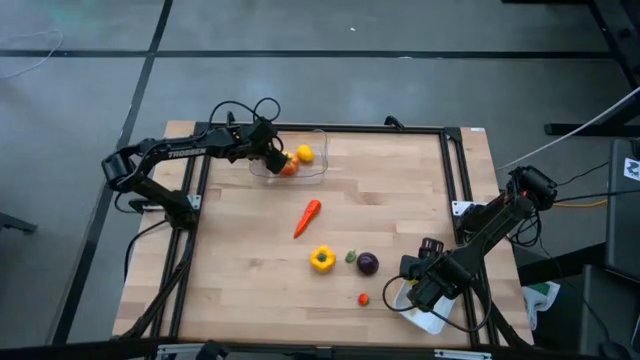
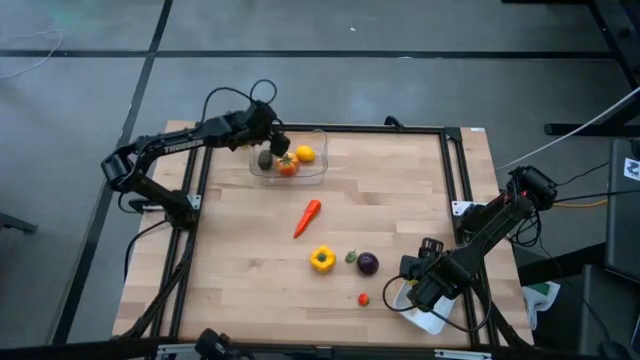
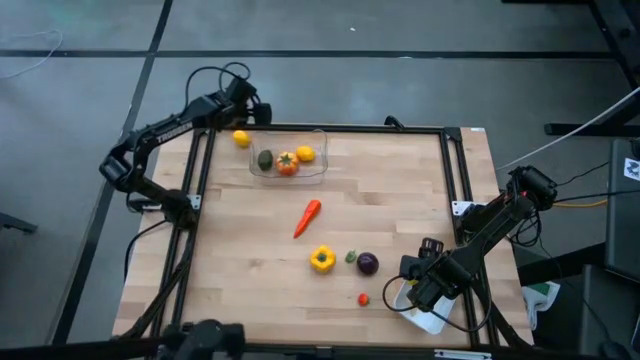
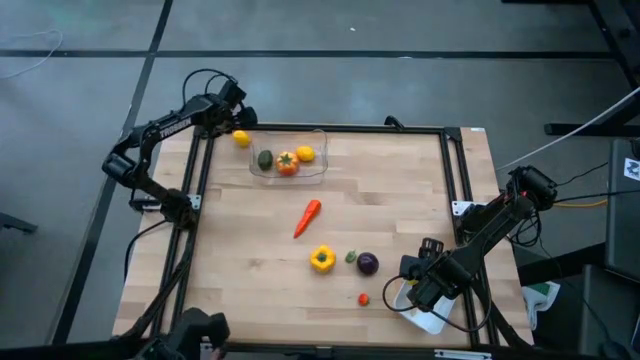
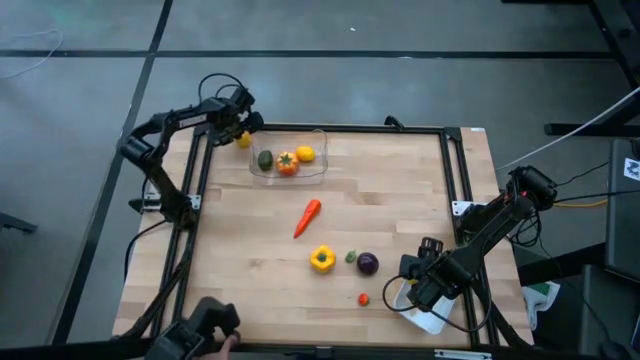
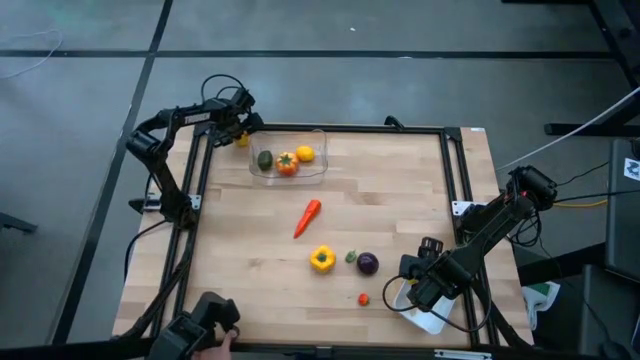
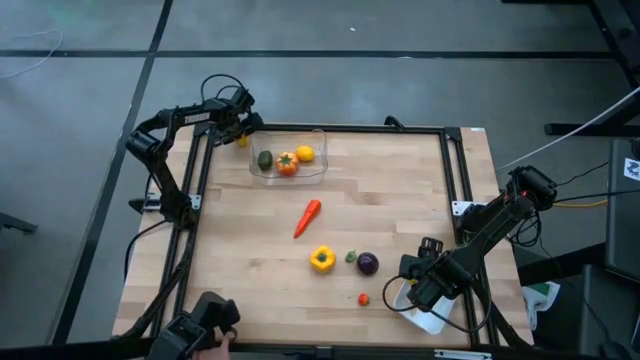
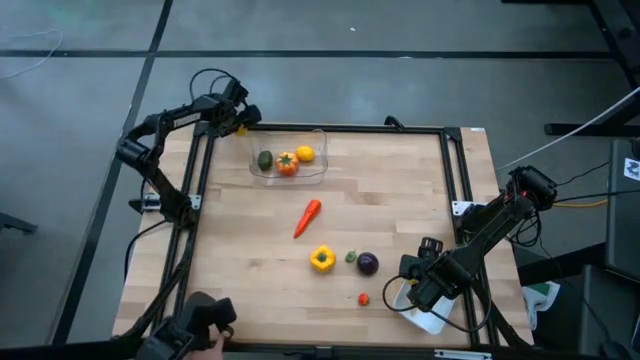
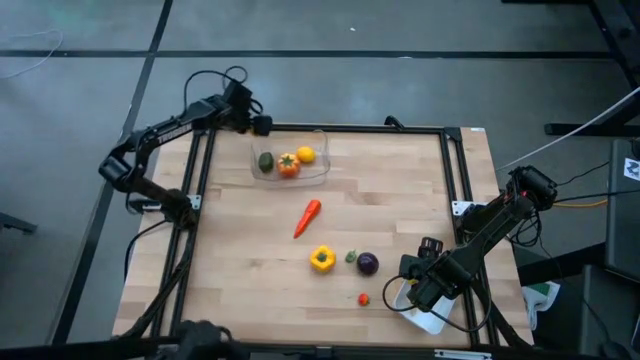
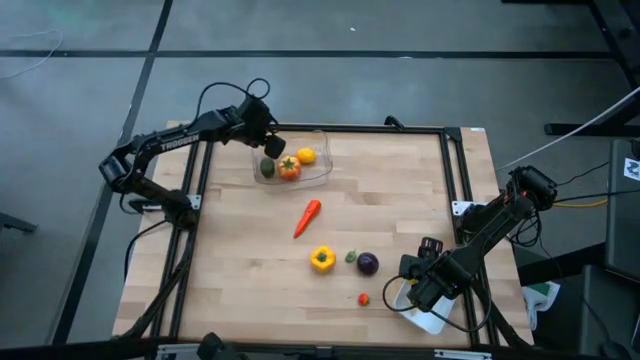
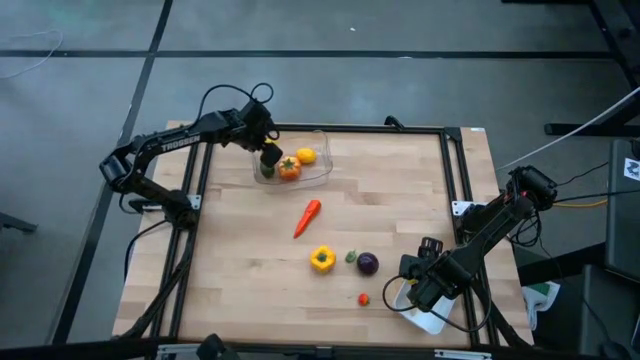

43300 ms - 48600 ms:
Task: Sort produce into baskets
Put the yellow lemon into the transparent bin

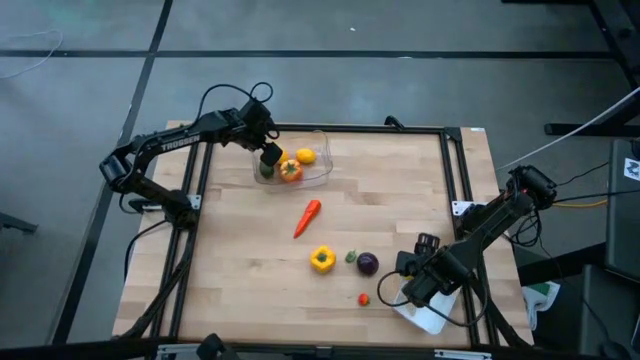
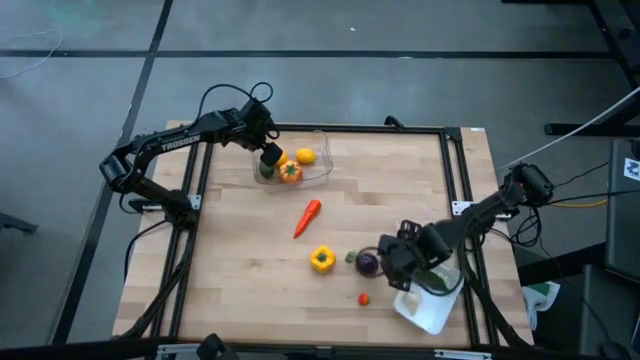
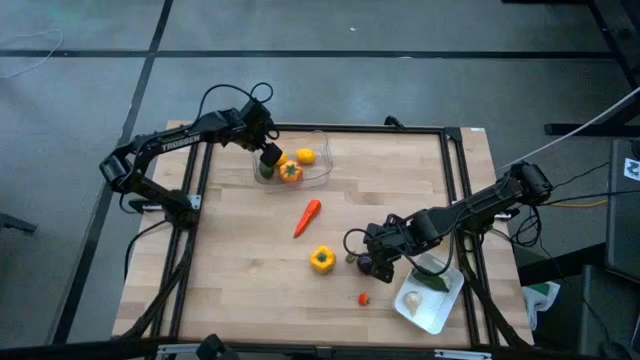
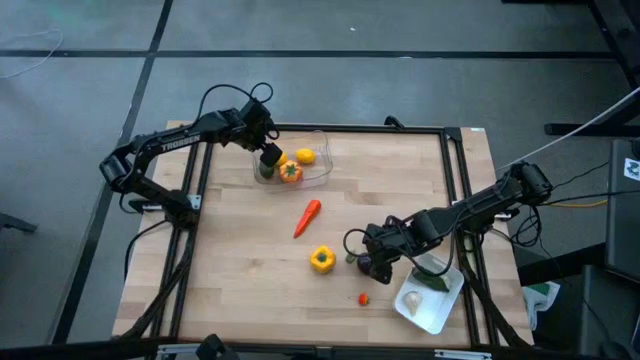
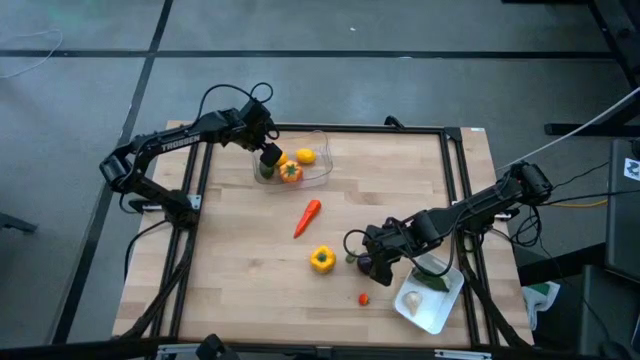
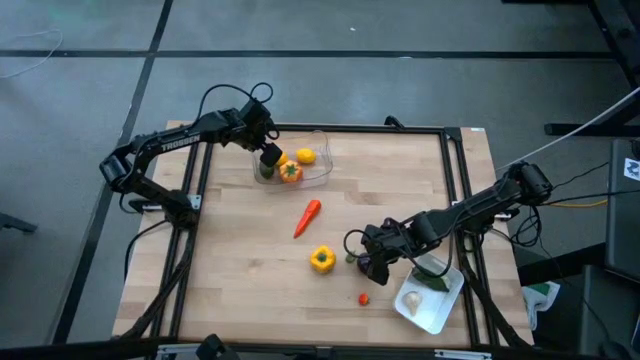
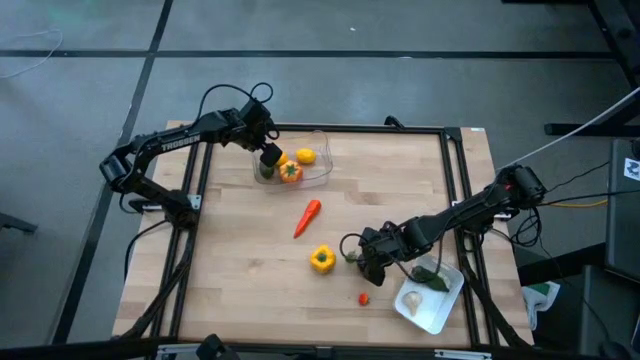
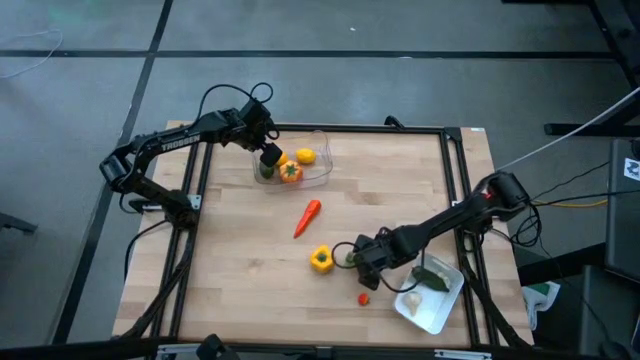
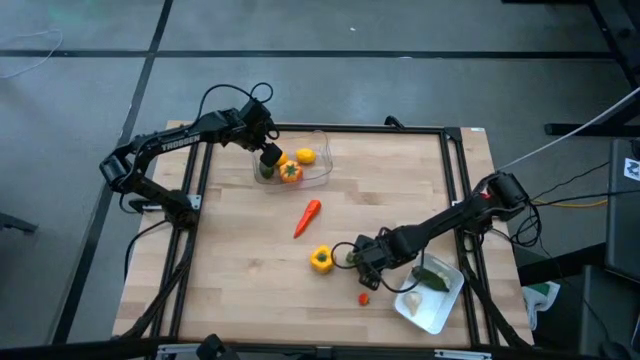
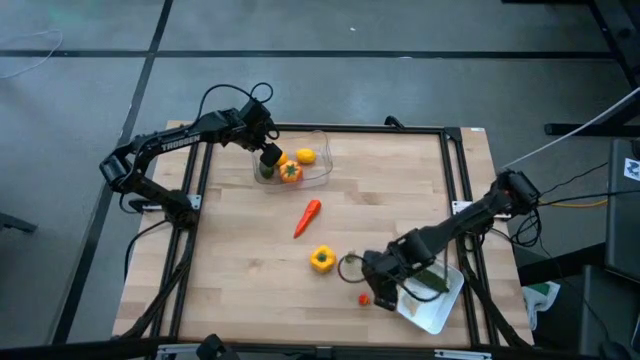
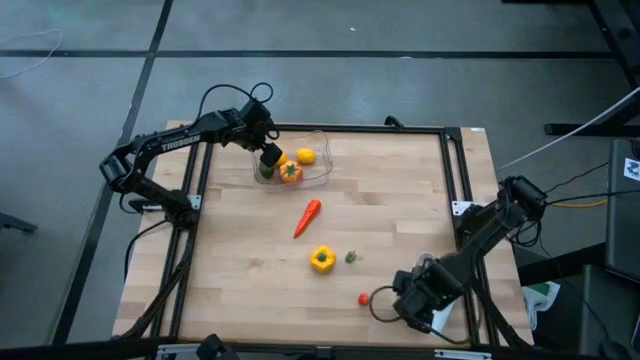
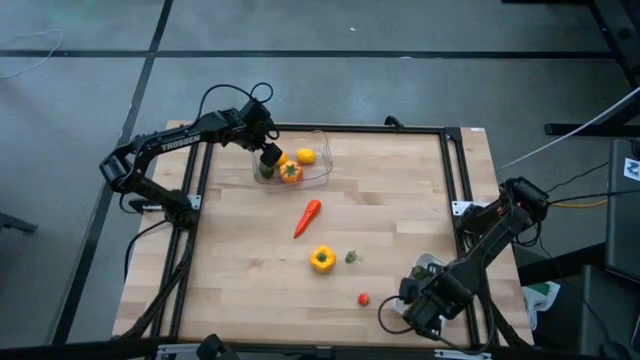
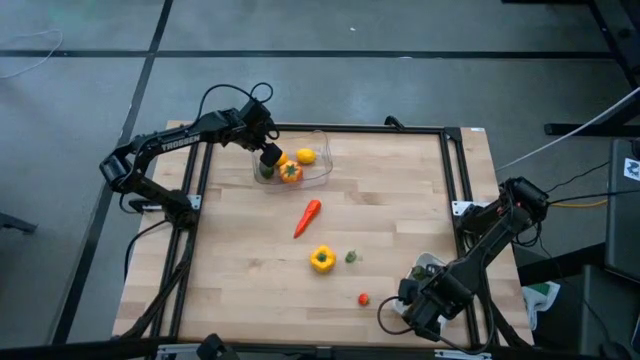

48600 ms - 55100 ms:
Put the purple plum into the white bin

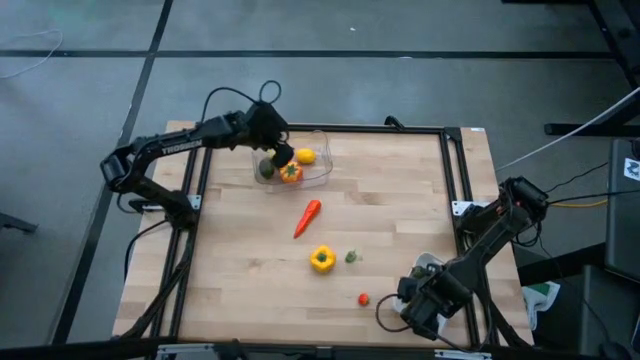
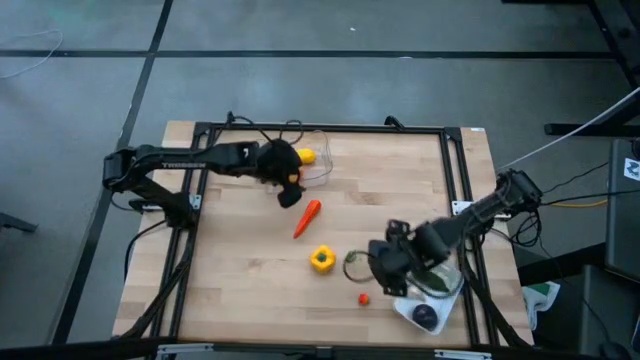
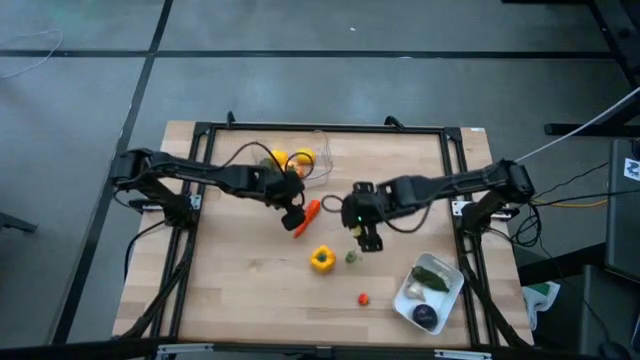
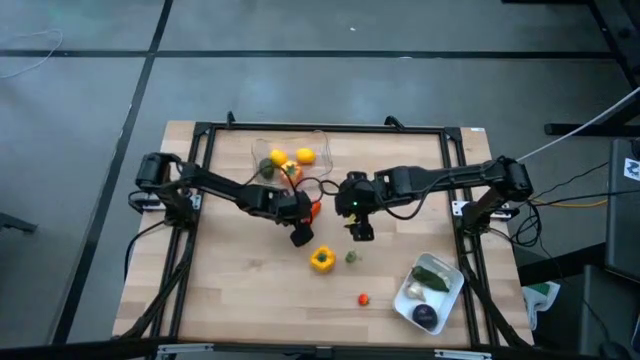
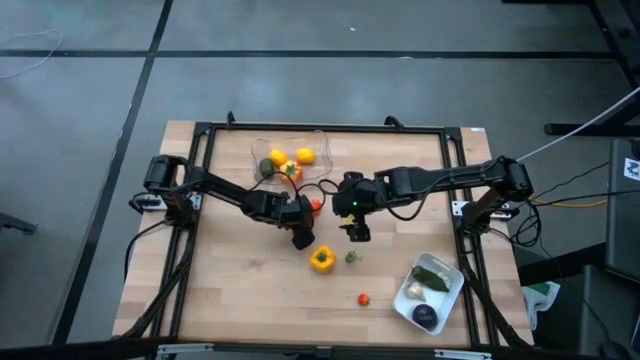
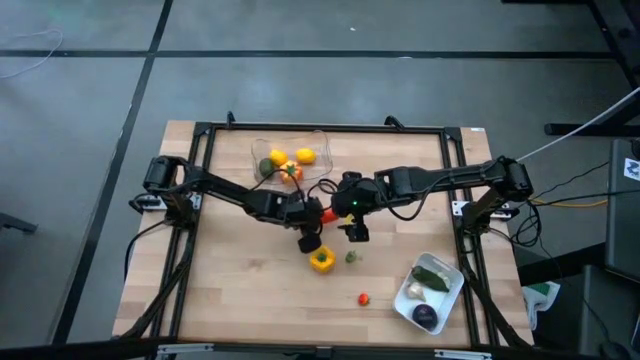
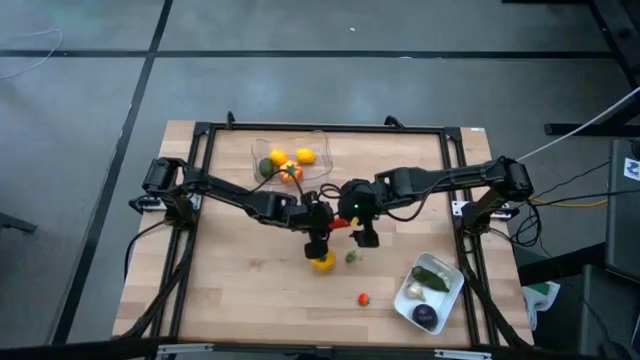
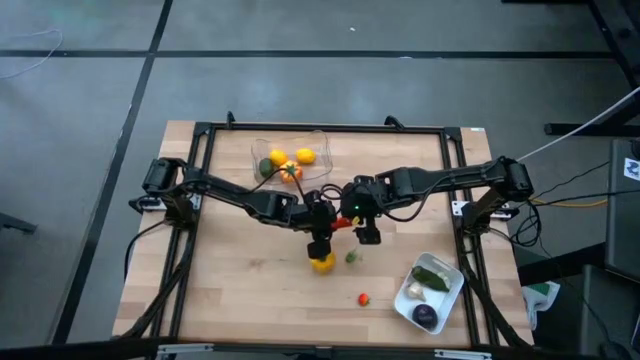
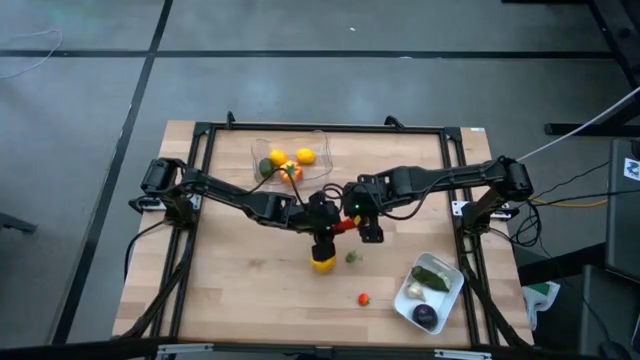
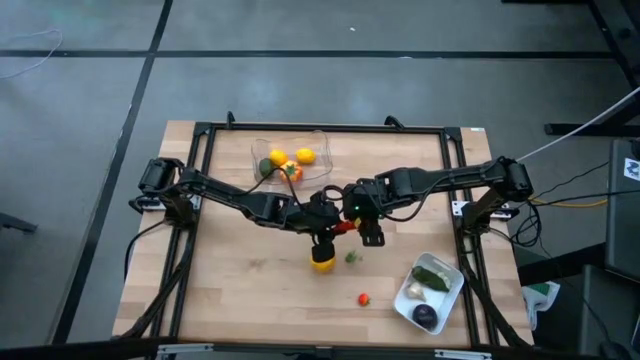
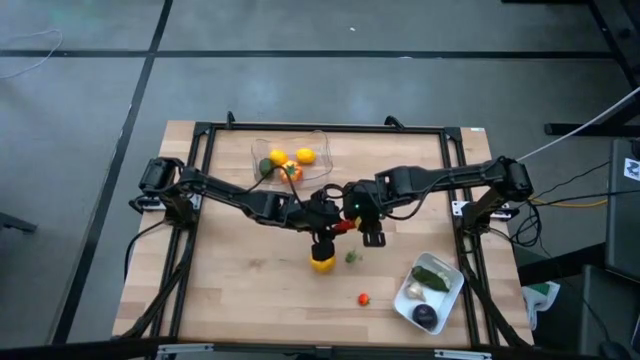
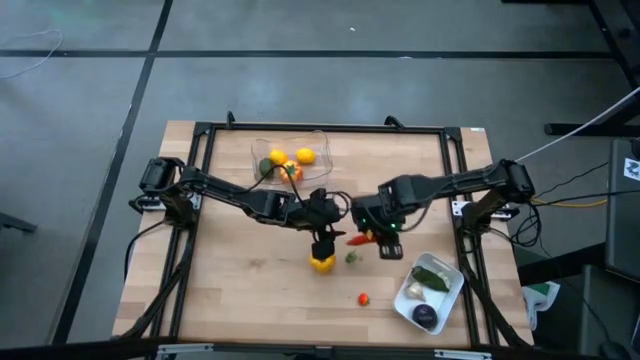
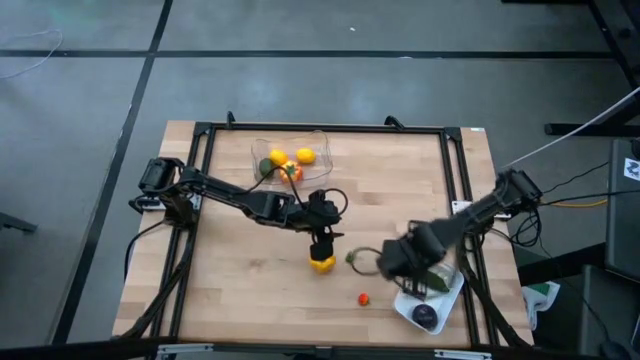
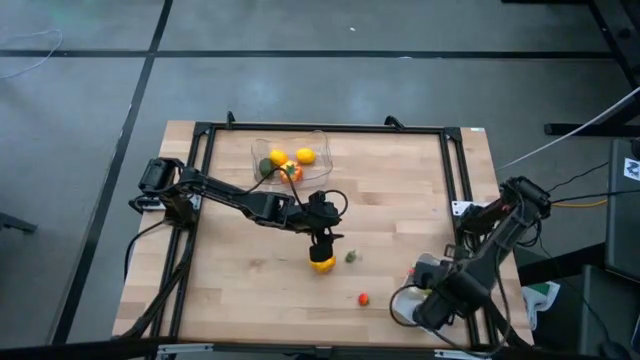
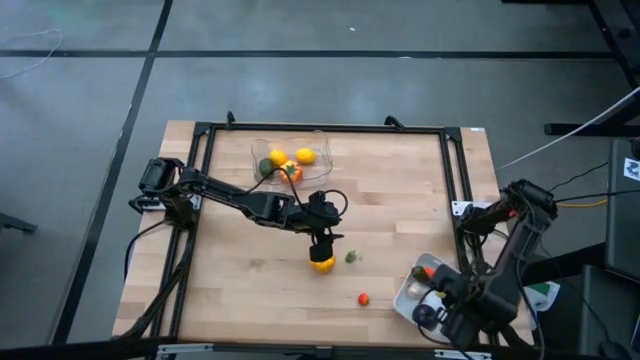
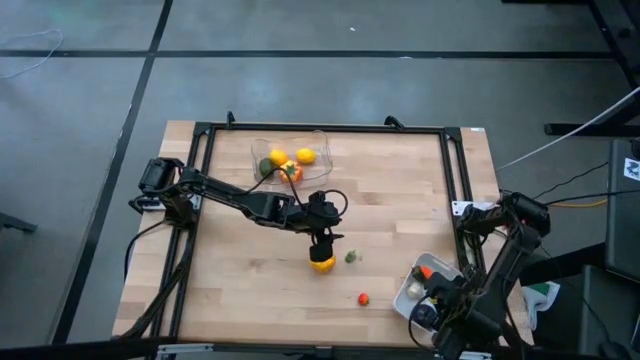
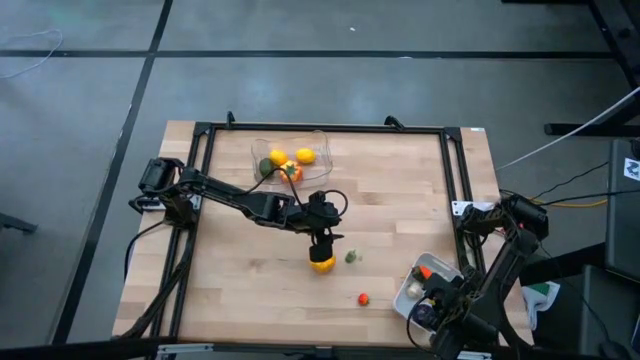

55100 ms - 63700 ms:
Put the orange carrot into the white bin

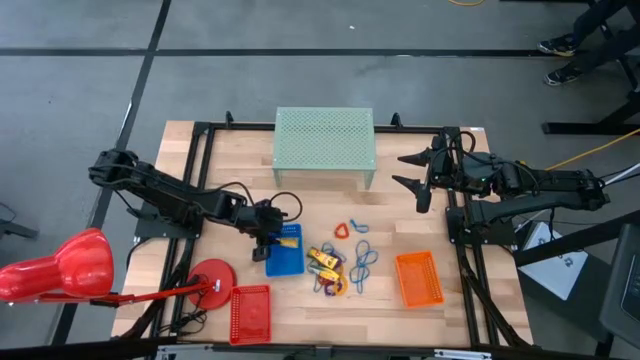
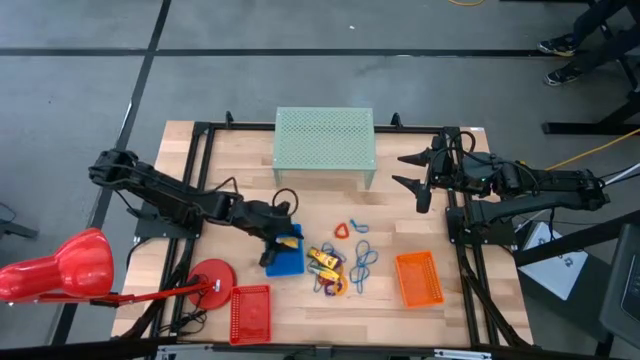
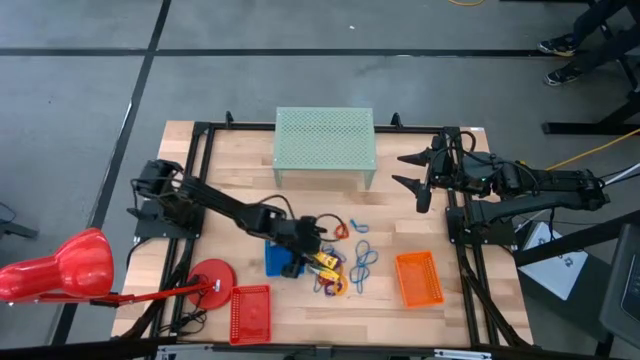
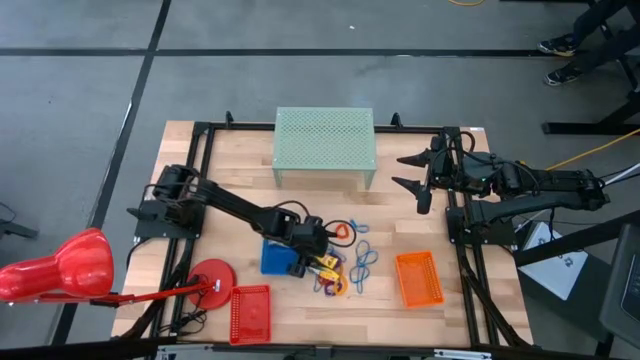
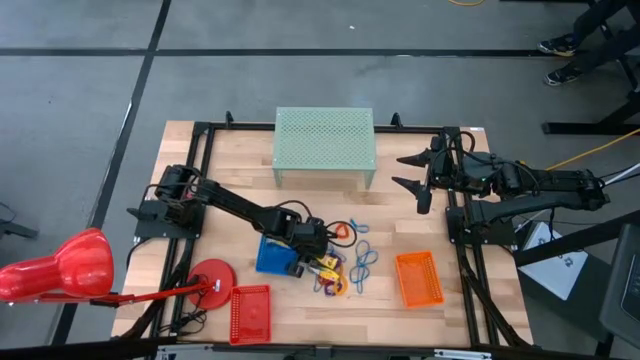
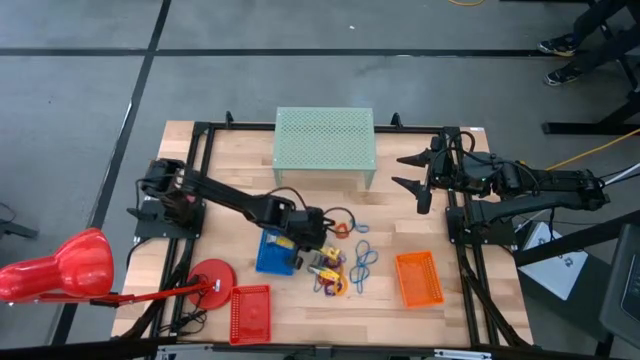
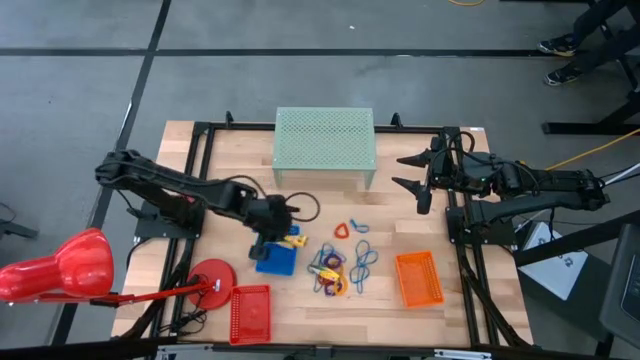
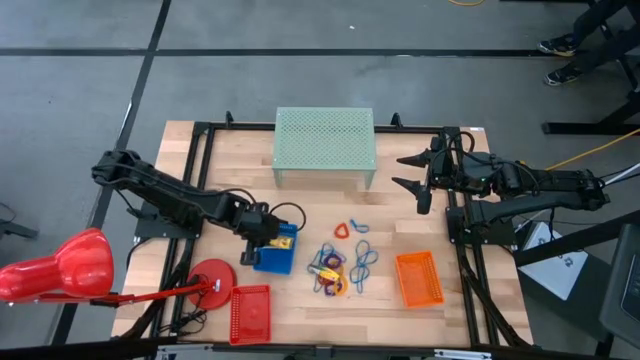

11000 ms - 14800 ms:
Task: Pick & Place Office Desk Supplies
Put the top yellow box of crayons into the blue bin
